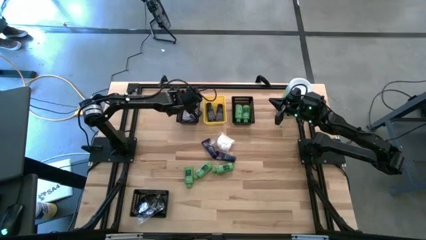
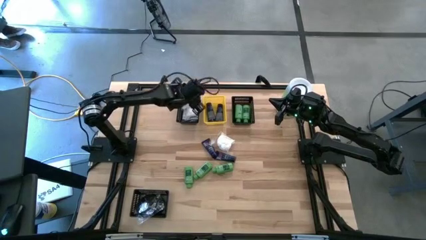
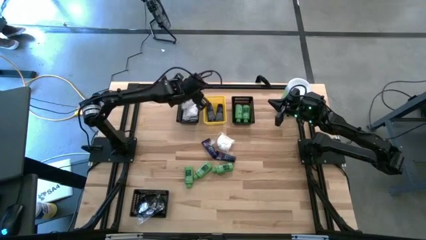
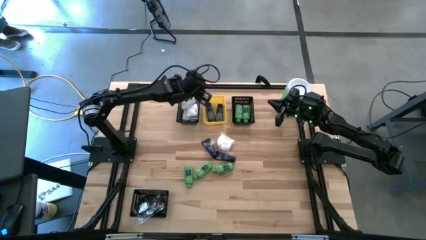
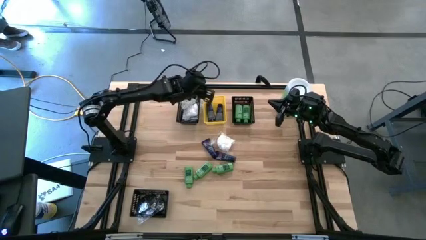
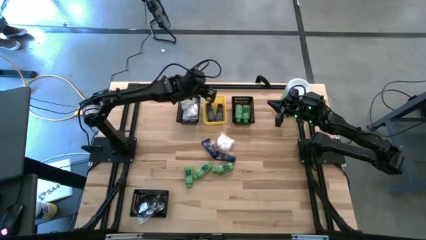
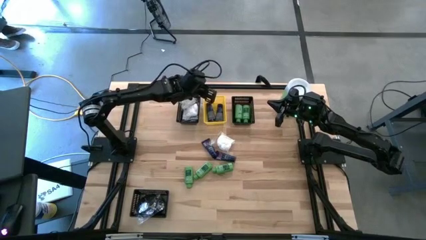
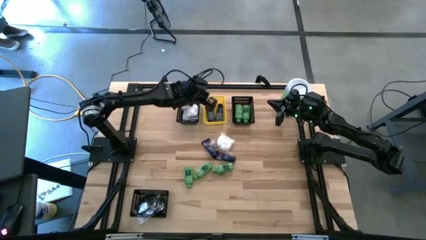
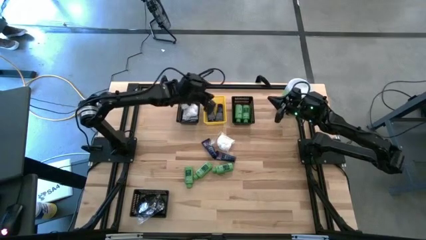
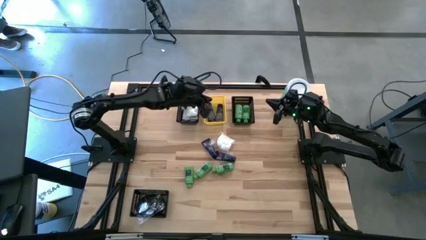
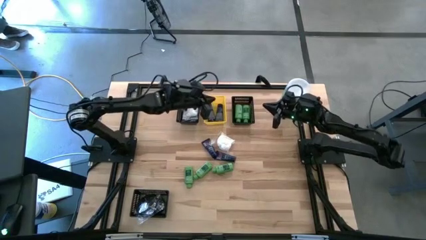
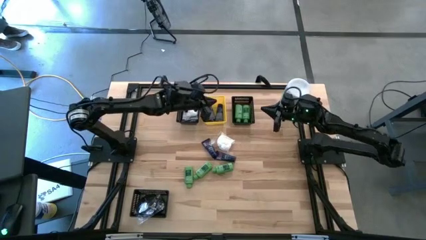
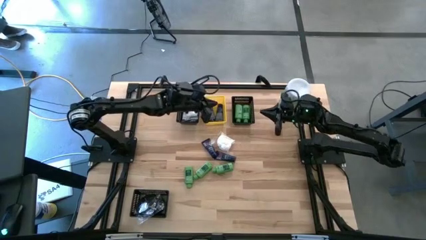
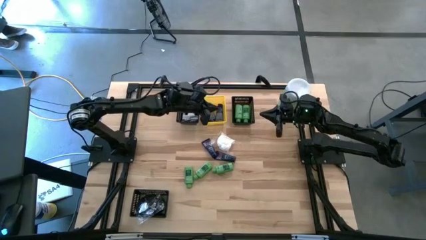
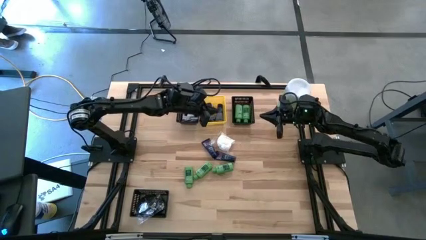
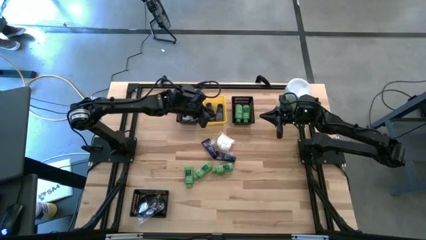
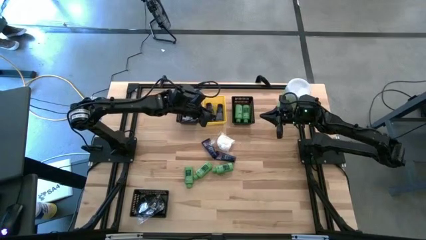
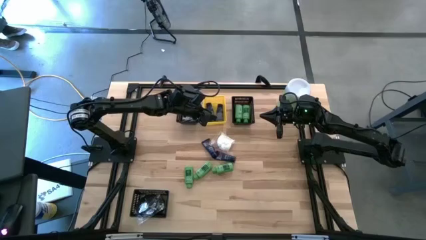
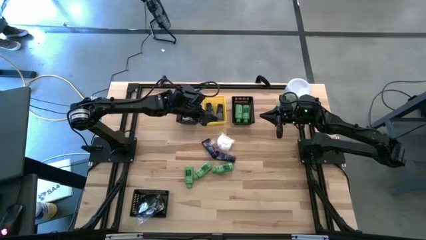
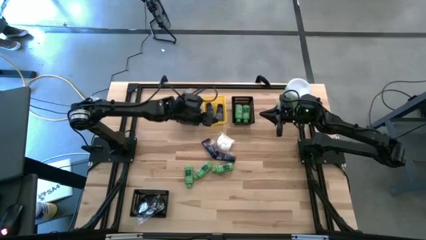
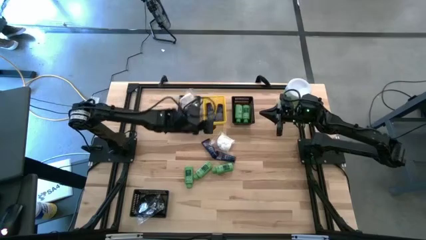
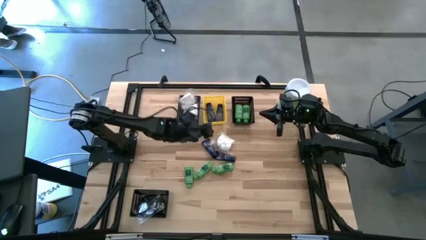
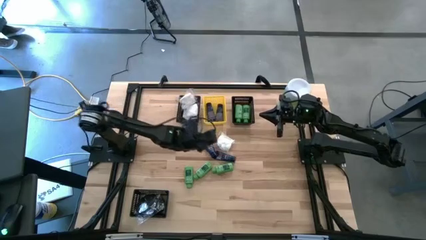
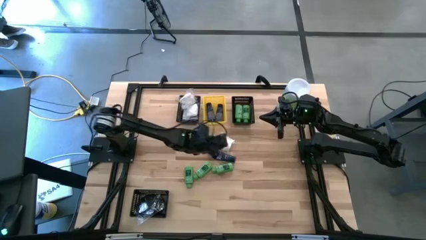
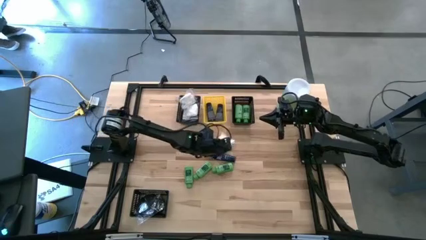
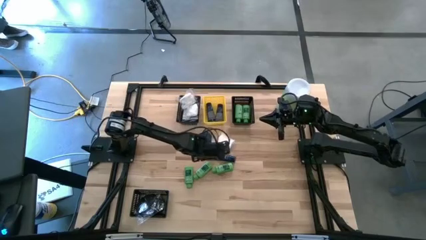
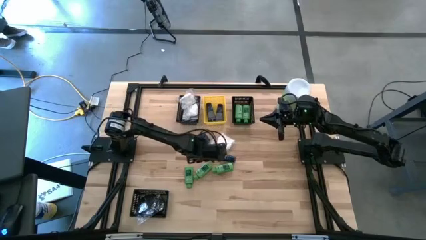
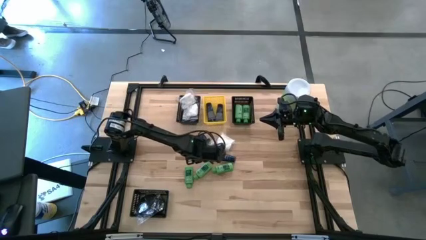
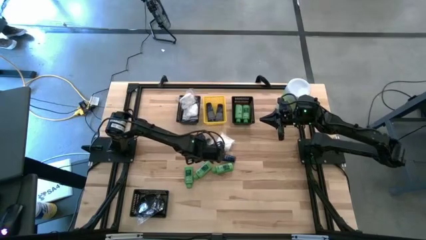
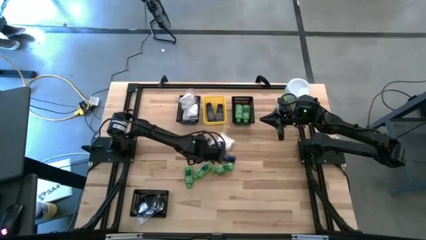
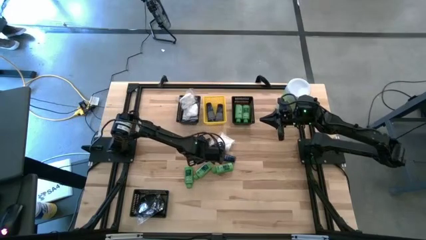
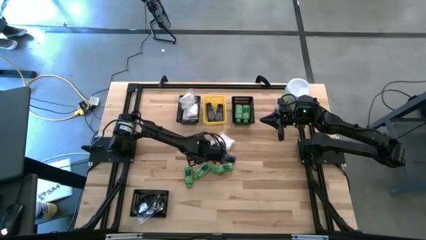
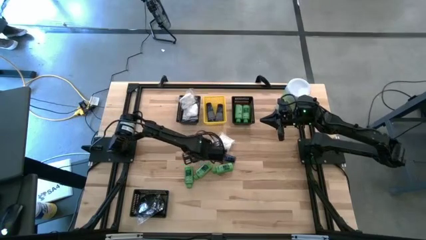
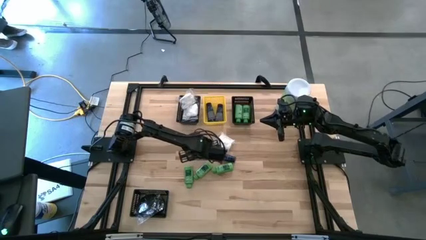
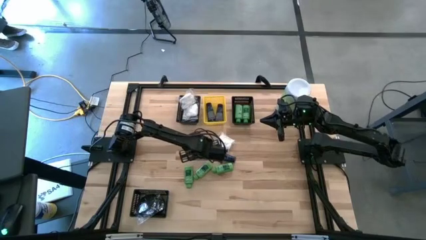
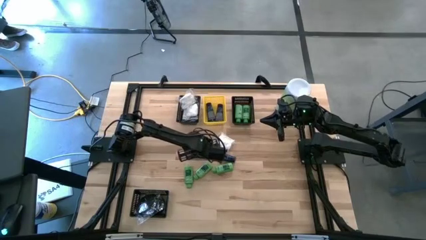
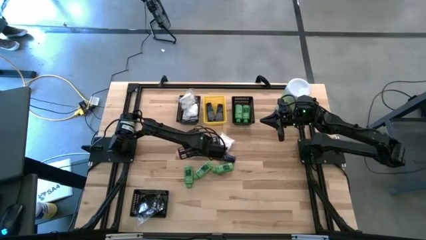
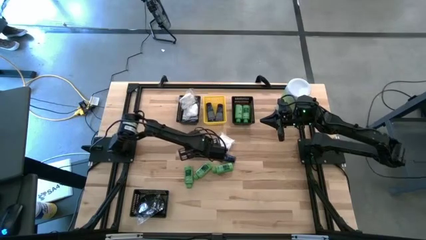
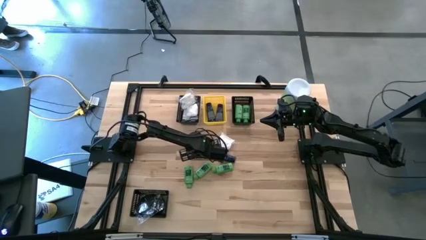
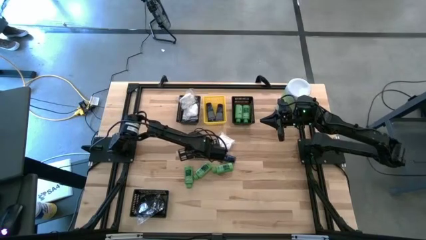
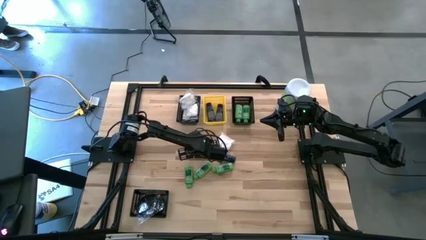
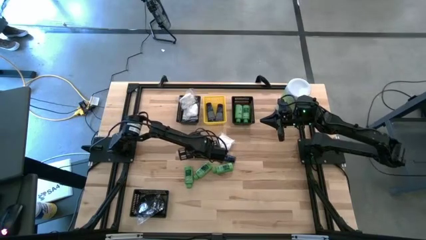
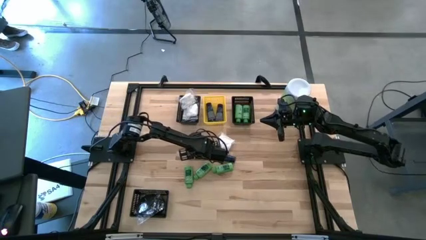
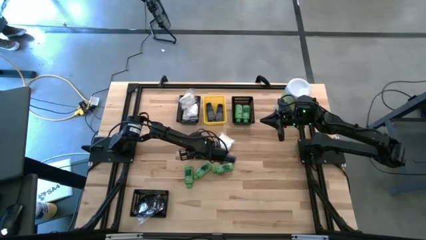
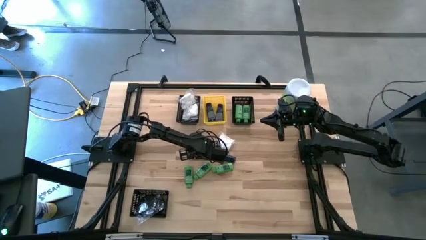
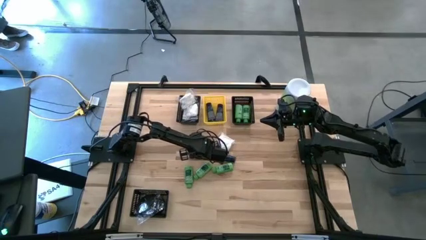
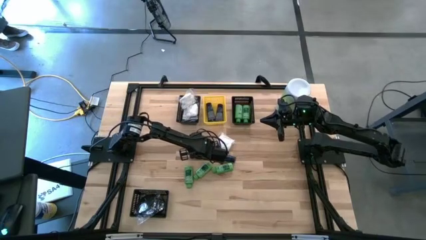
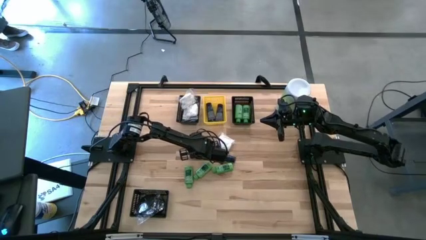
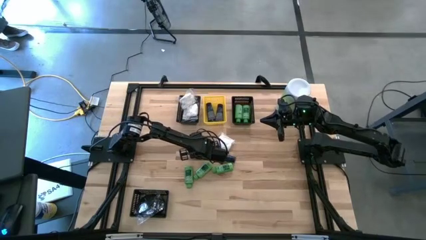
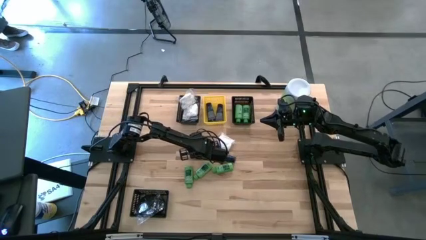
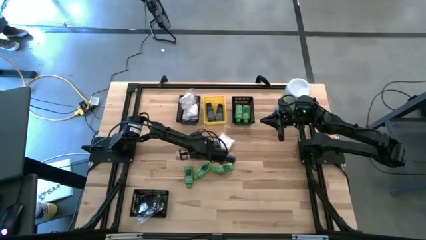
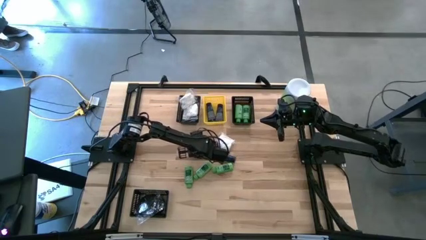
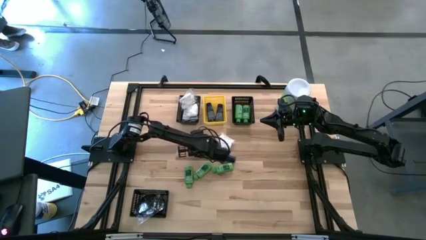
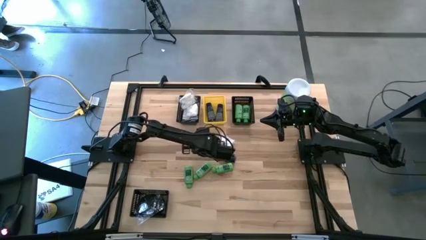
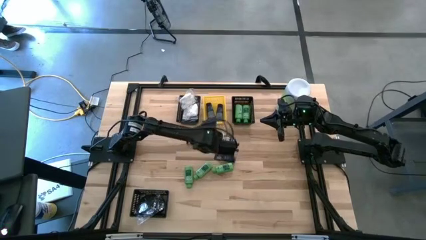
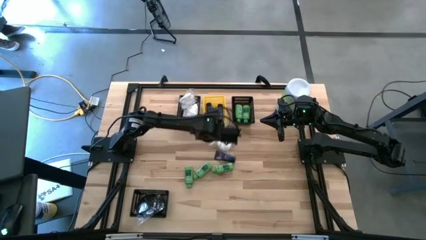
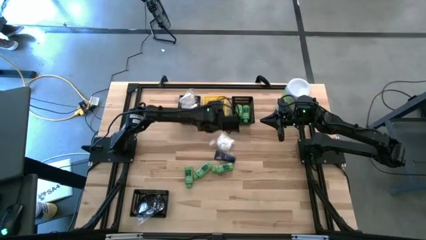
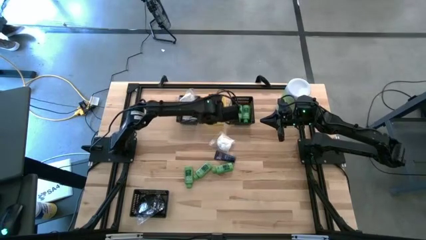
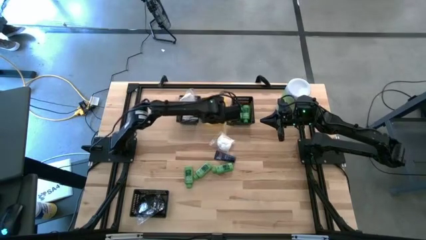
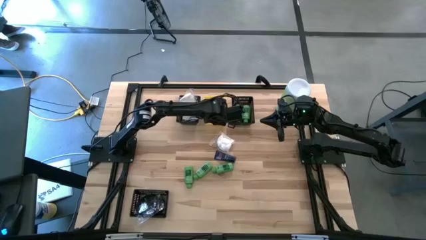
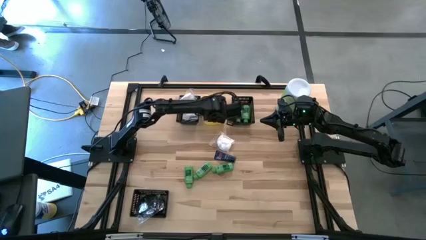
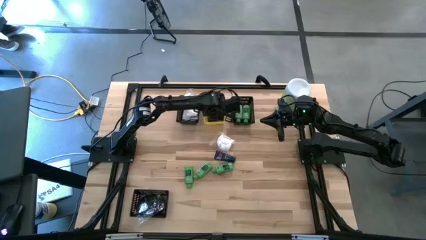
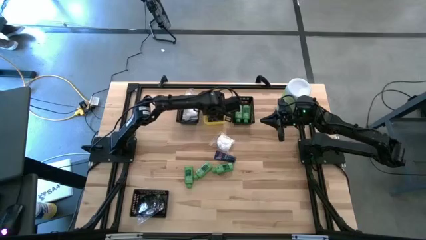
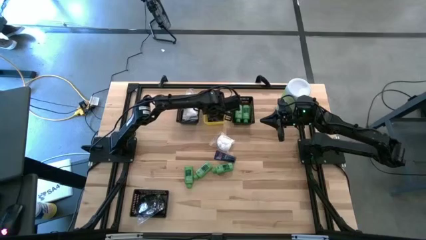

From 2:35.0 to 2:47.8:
Task: Pick & Place Travel size toiletries
Put the blue shave cream bottle into the yellow bin
